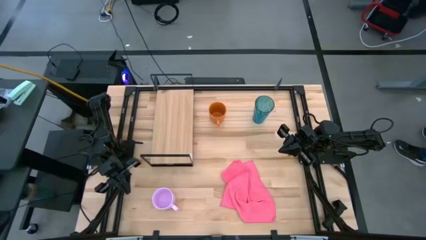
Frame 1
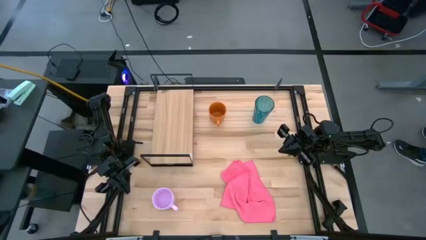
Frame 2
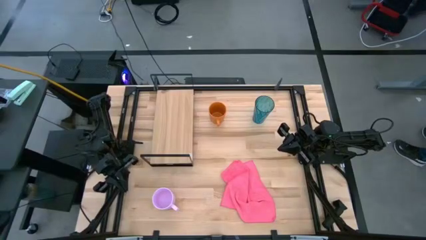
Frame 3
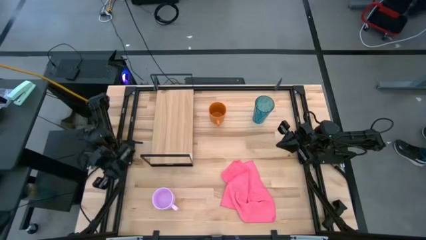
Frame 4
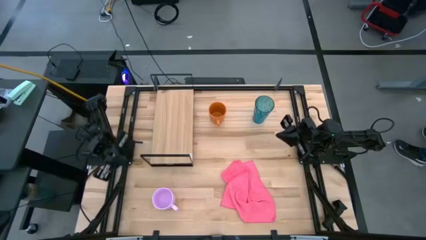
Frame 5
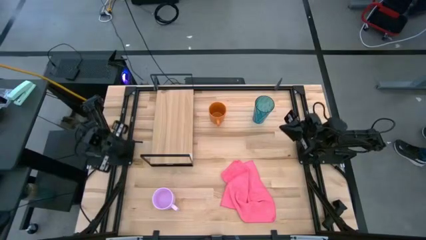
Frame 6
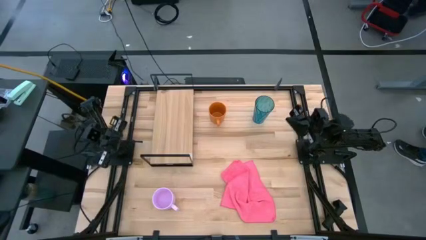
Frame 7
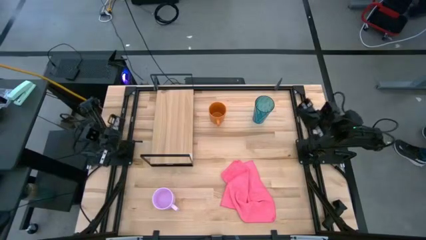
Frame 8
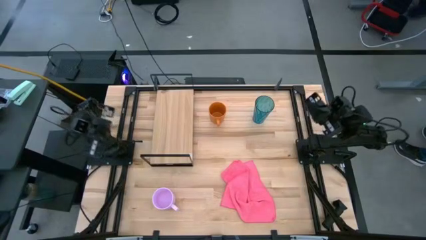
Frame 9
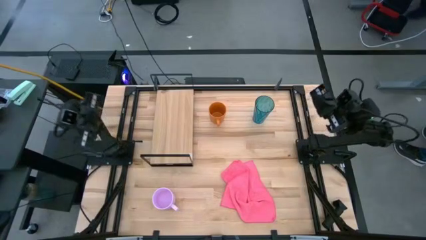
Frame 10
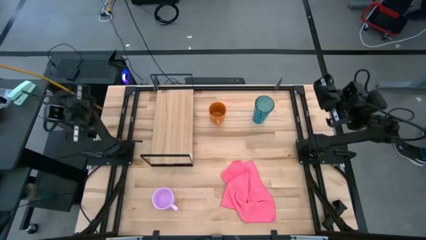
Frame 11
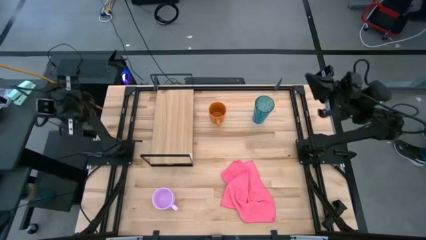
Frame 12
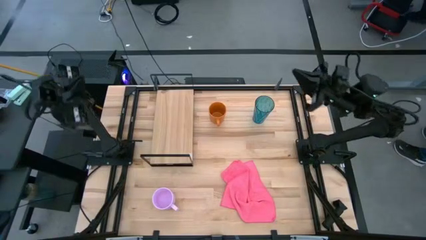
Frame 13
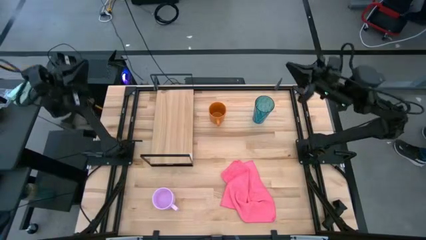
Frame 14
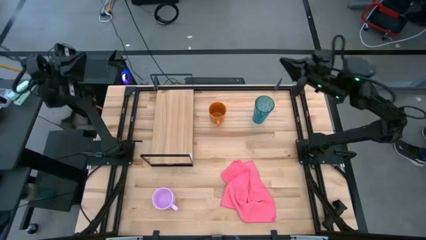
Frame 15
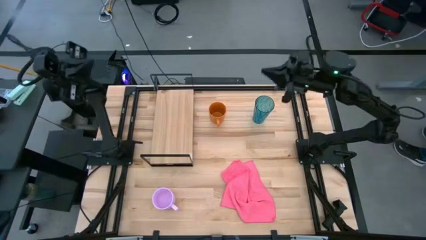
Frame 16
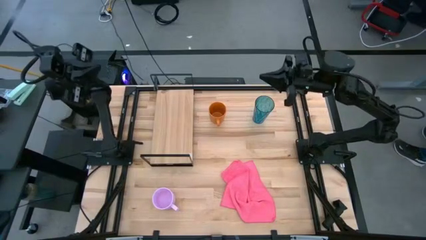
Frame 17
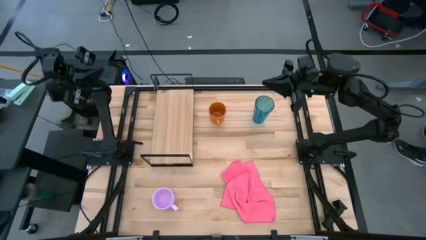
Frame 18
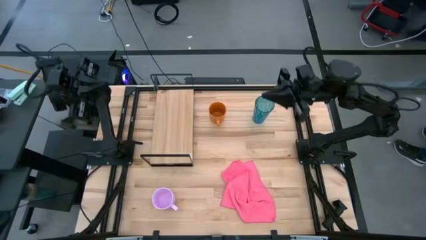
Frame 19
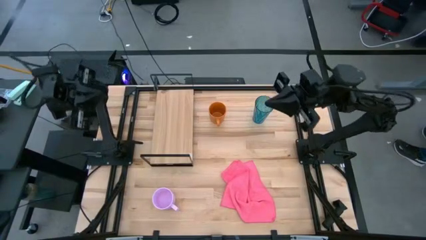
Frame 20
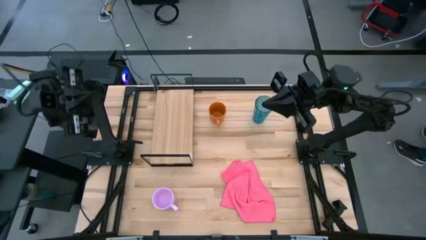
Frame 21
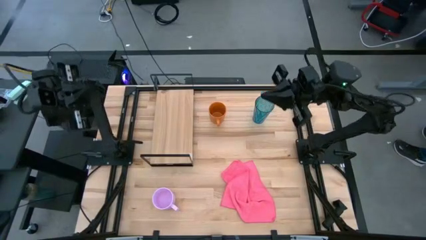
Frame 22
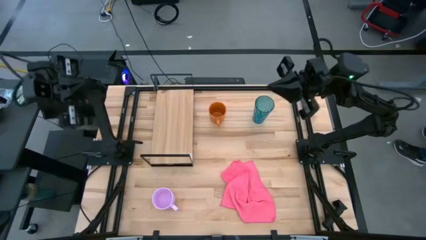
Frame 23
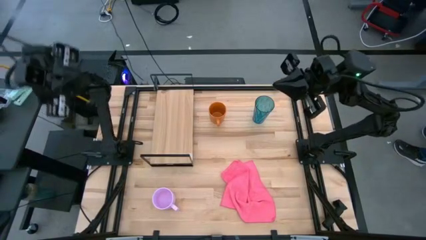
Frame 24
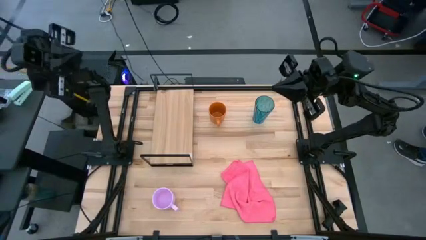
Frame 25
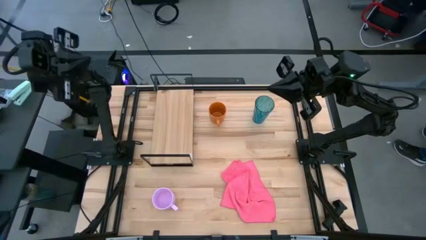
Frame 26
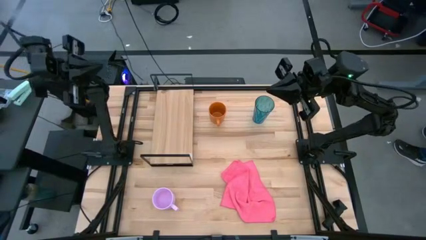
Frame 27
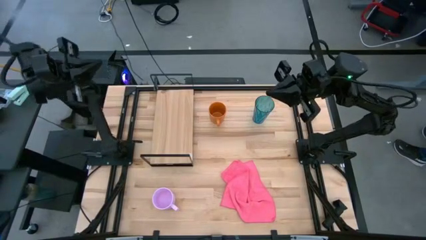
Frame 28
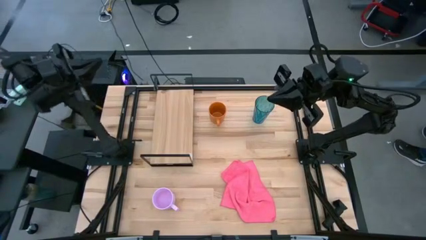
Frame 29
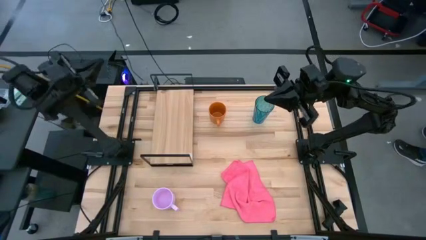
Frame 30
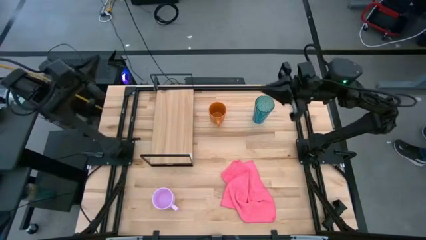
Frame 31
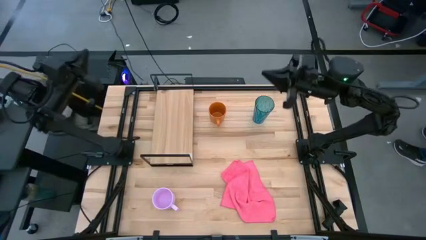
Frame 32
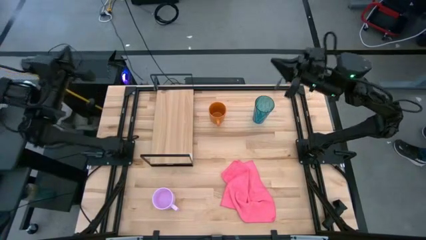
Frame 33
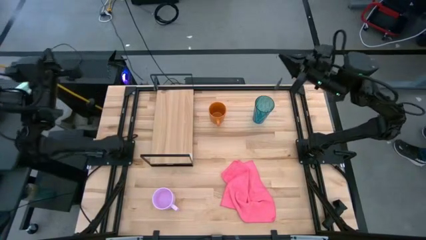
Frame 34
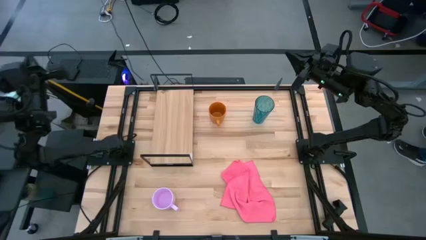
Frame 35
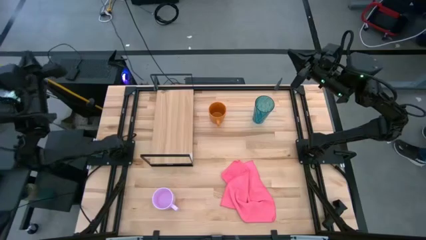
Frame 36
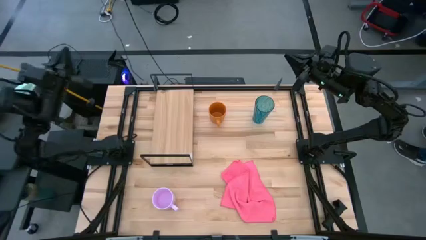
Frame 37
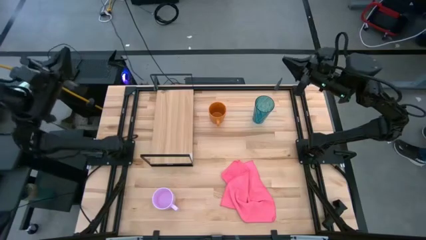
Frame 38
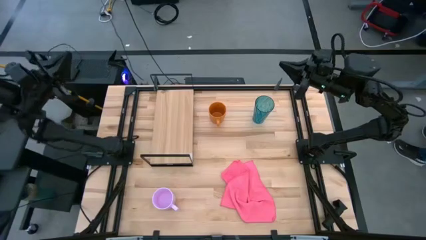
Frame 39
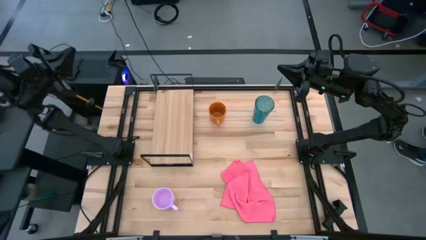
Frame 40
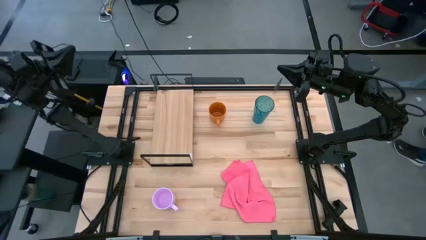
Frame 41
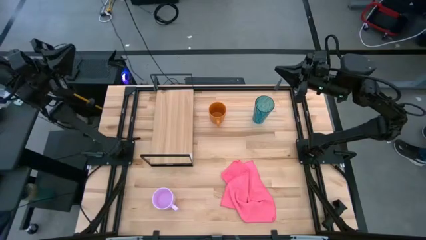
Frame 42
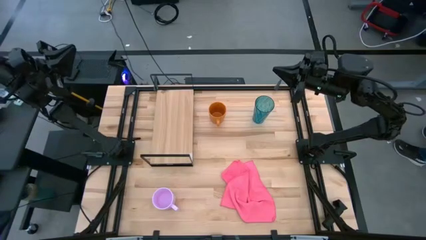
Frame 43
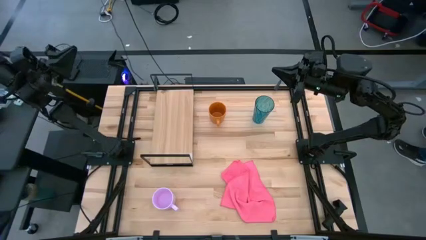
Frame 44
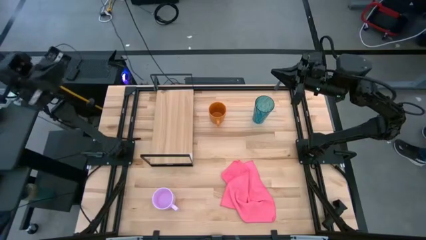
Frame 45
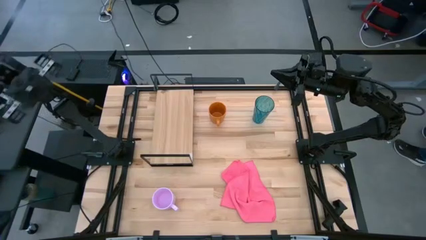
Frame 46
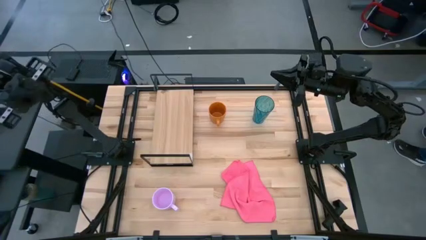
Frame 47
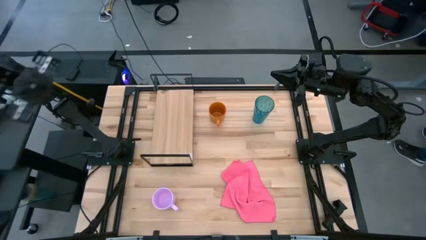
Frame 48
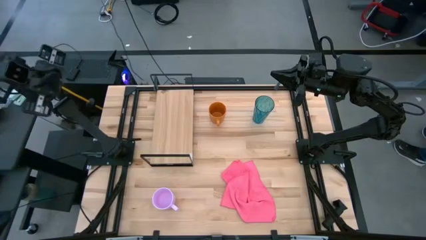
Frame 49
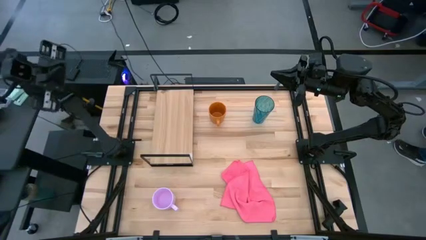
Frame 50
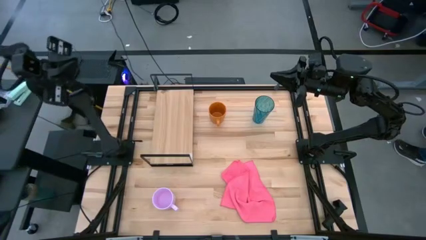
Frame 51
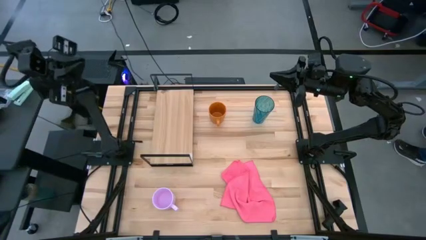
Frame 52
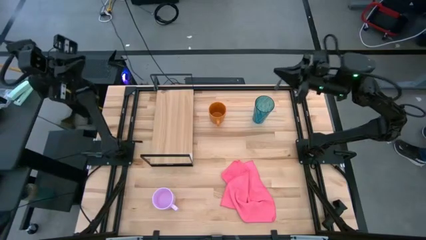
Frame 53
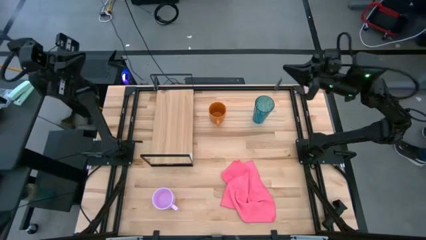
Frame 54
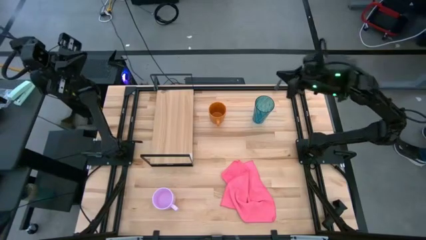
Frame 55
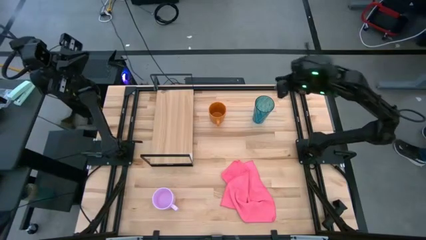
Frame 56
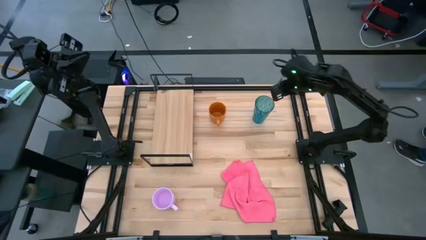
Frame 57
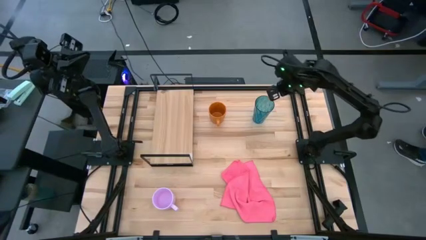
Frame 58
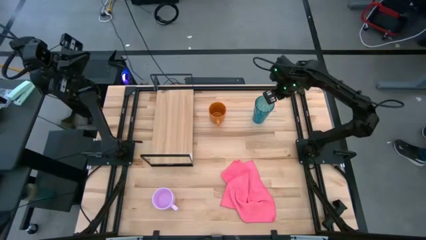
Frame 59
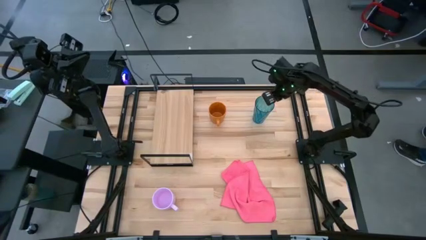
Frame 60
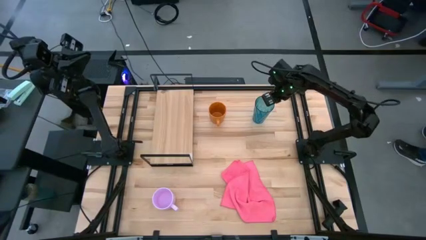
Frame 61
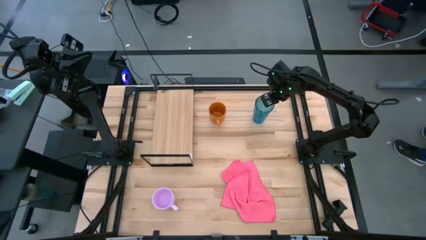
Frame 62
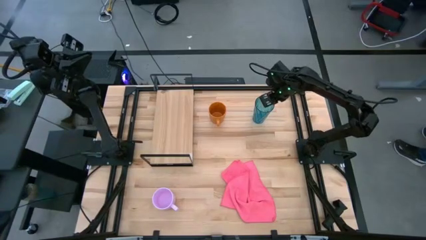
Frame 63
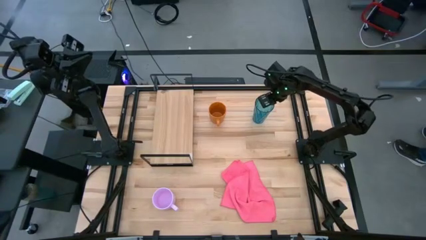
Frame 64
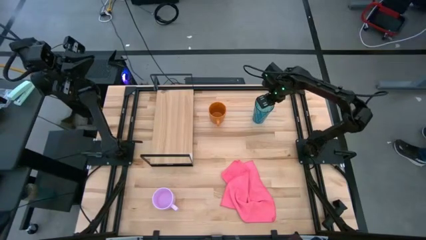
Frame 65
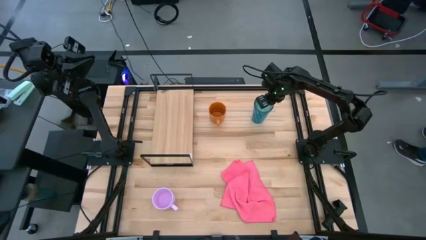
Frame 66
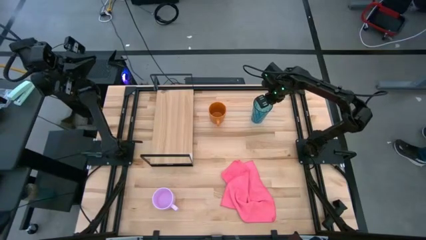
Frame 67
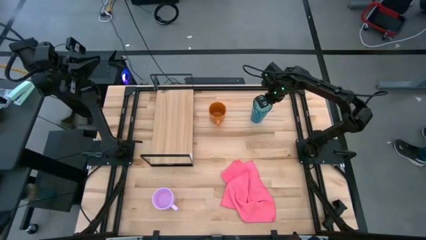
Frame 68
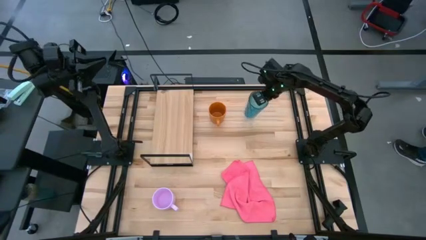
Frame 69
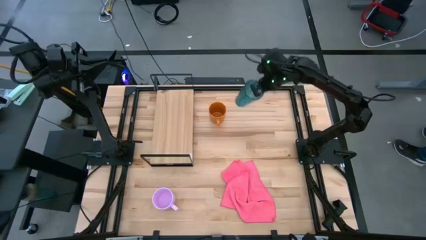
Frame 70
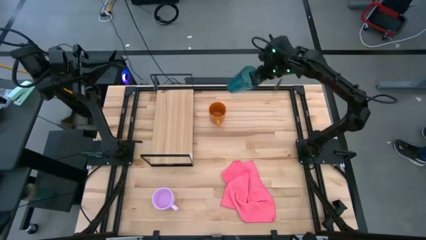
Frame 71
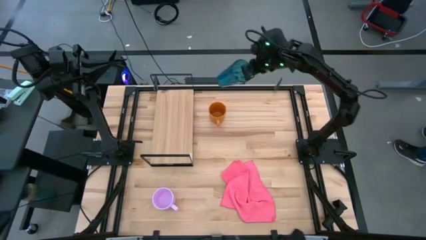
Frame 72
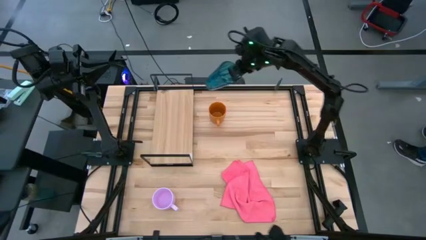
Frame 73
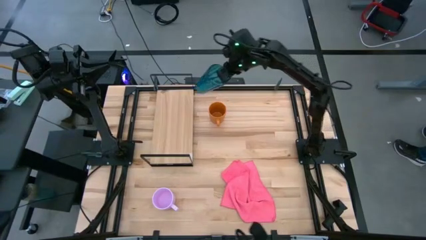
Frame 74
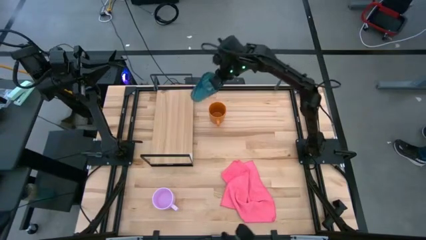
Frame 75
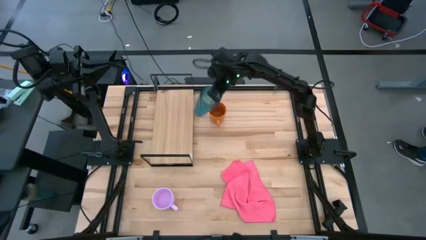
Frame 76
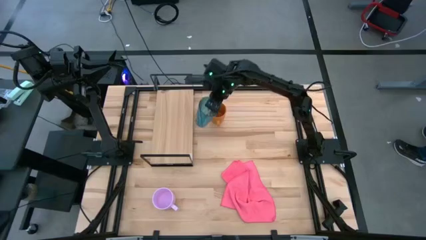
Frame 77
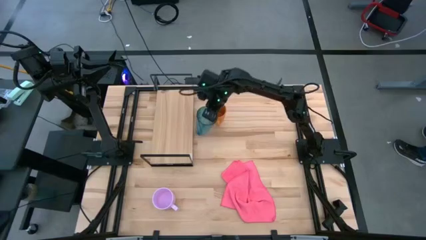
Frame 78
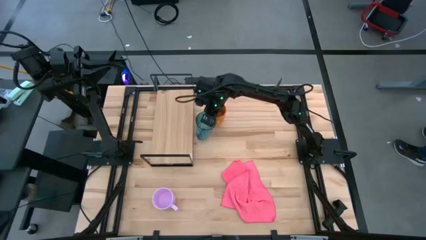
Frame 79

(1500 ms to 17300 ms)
Task: Stack small to large cups/mugs on shelf
Put the blue cup on the shelf
